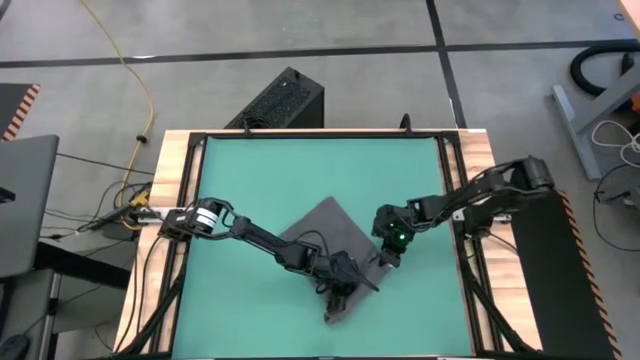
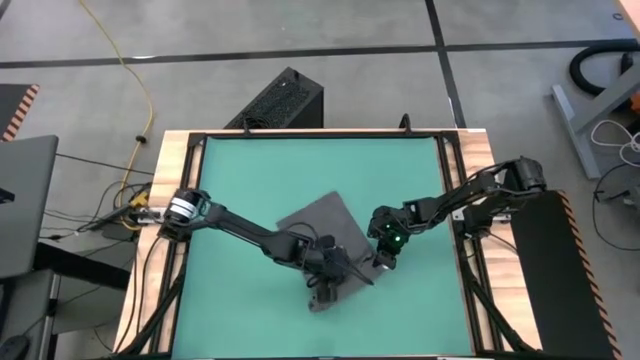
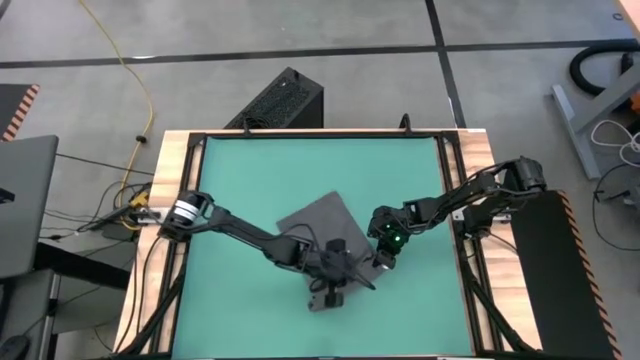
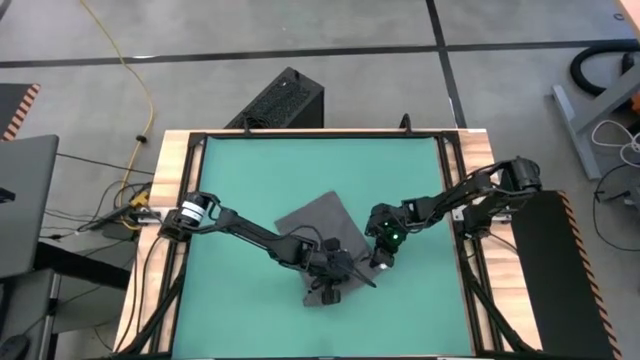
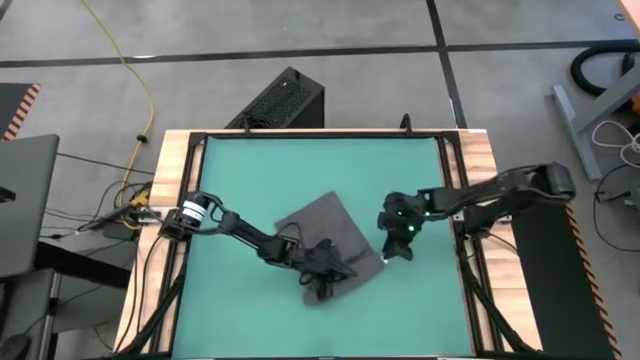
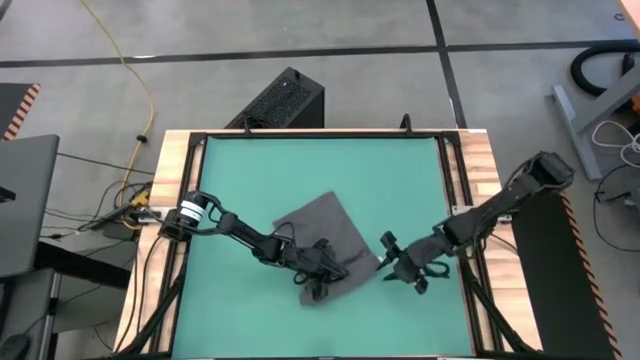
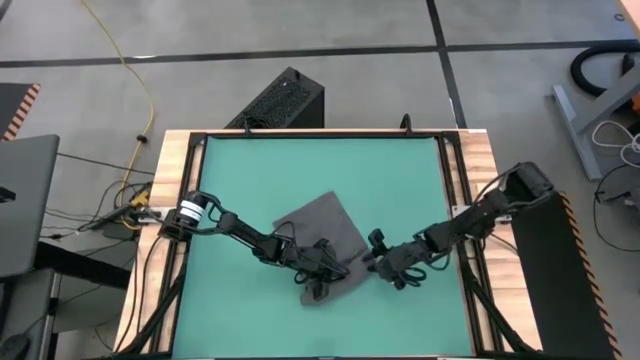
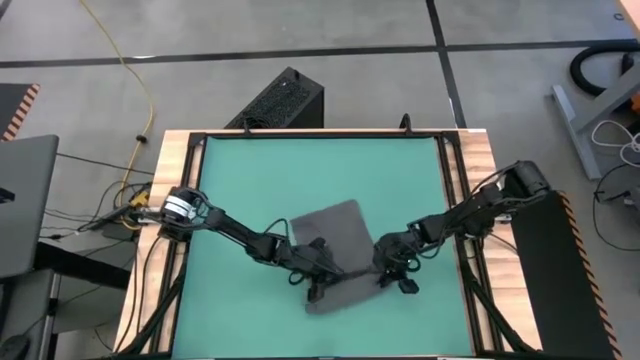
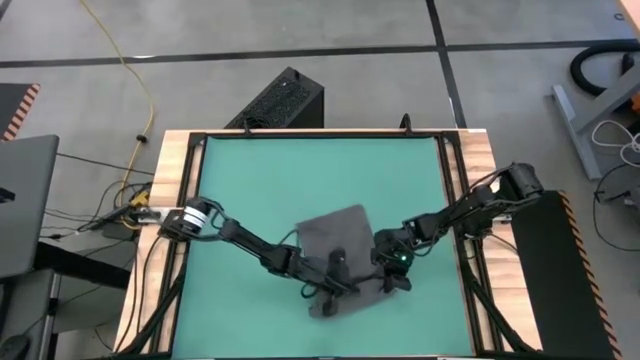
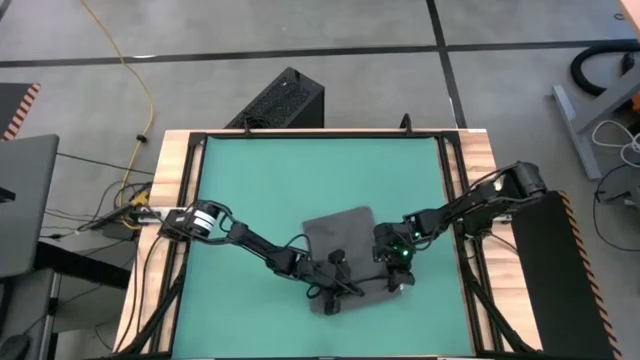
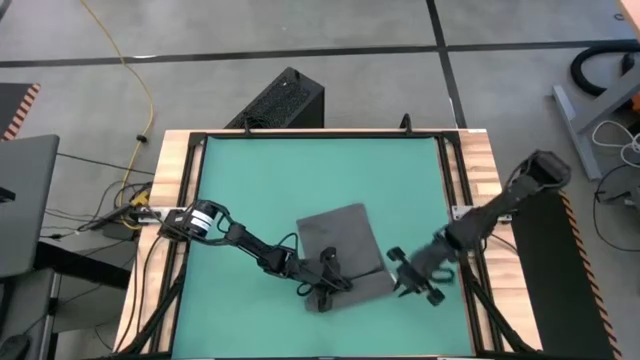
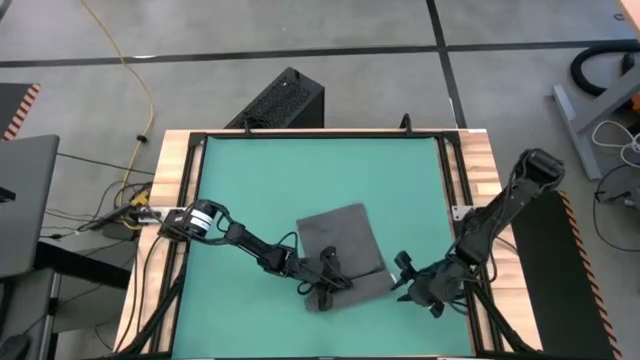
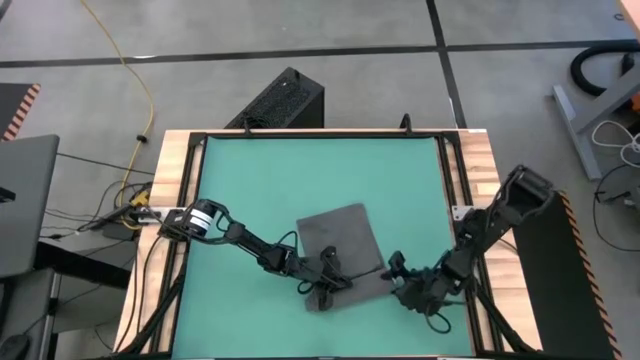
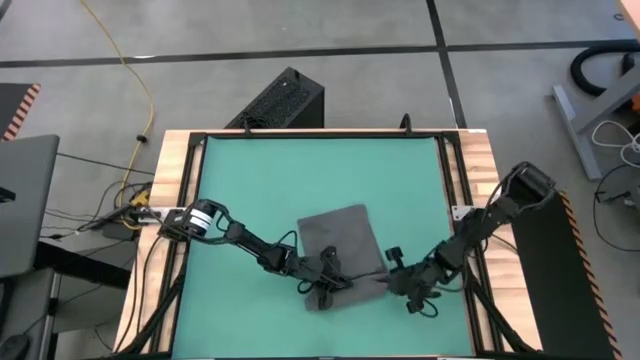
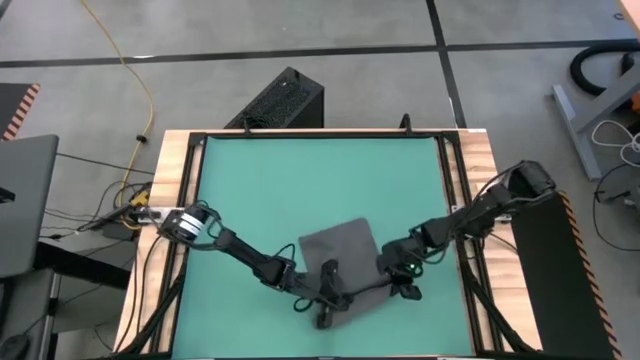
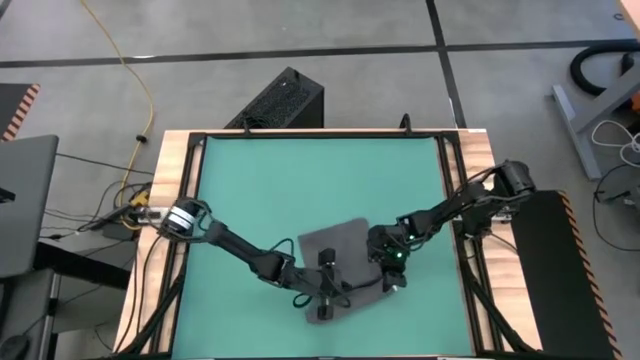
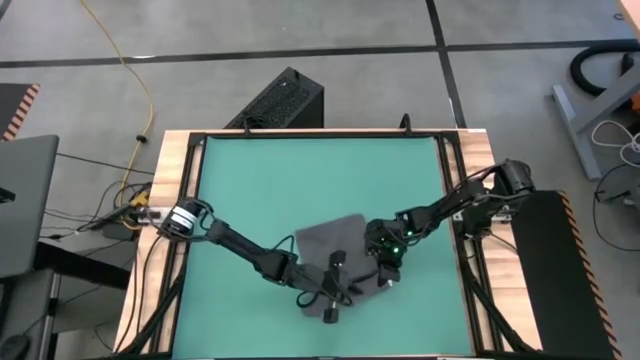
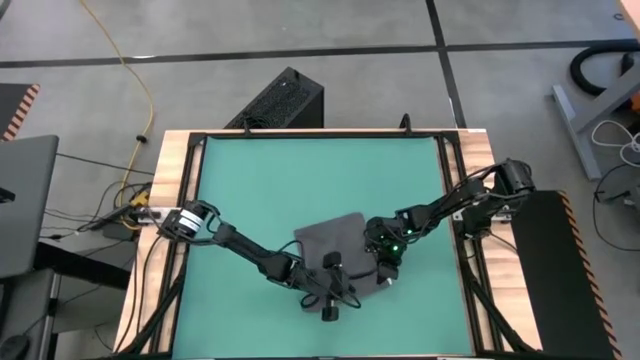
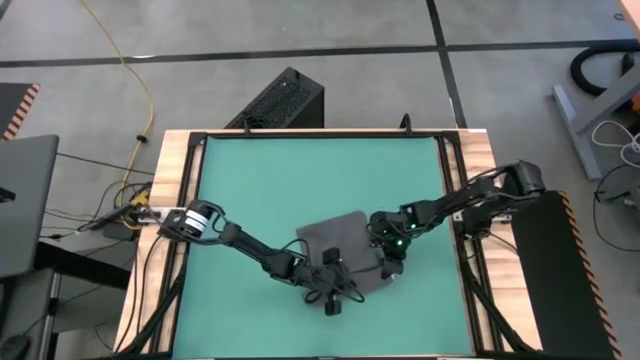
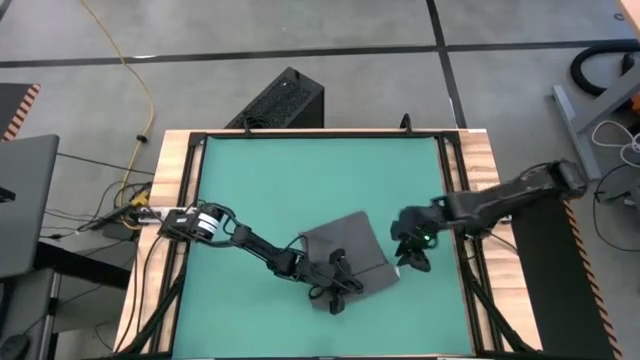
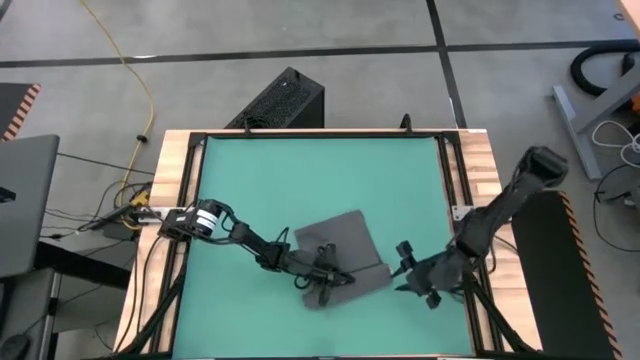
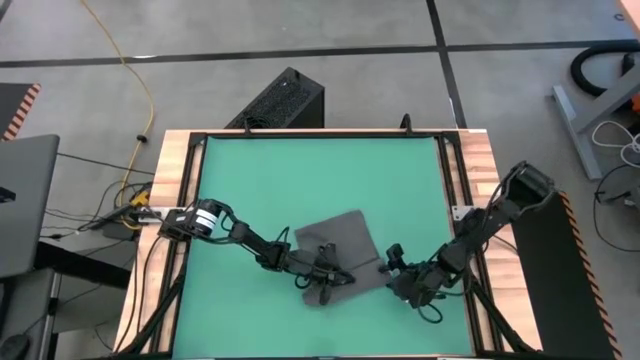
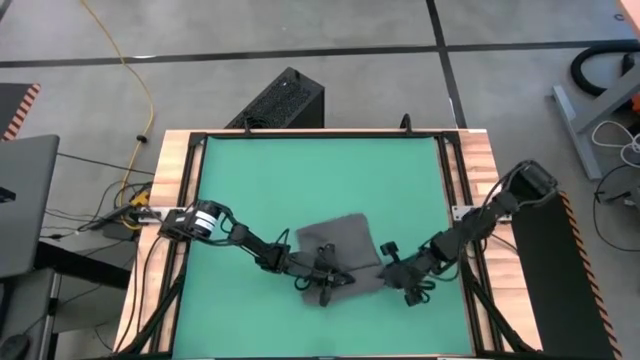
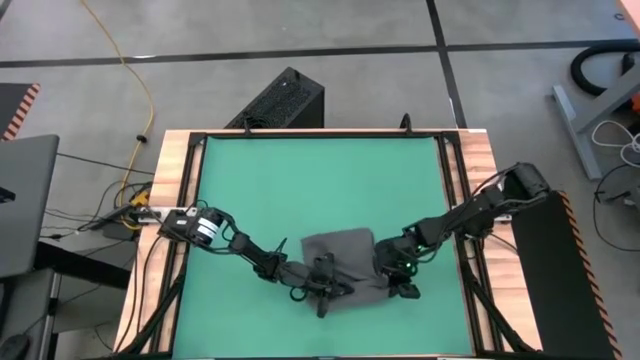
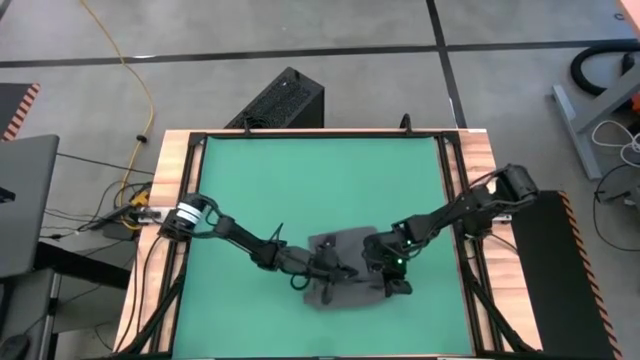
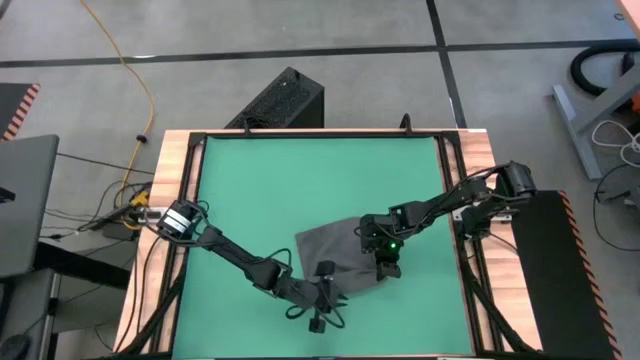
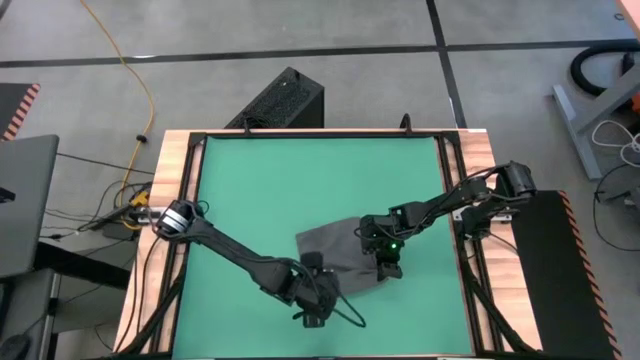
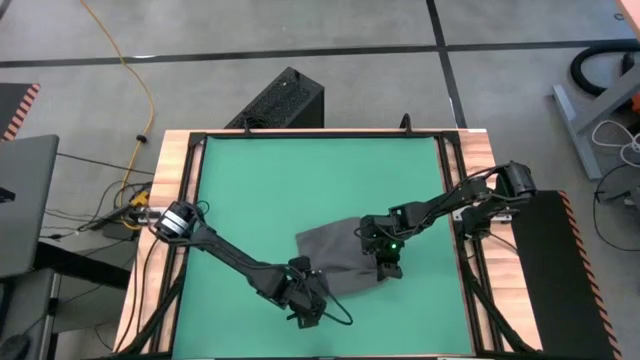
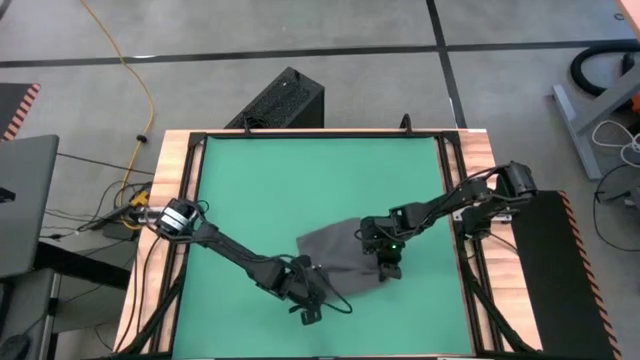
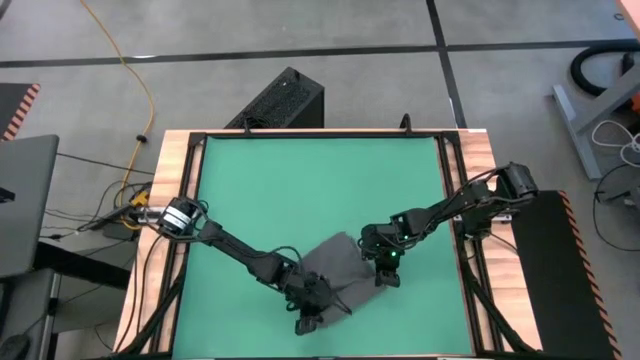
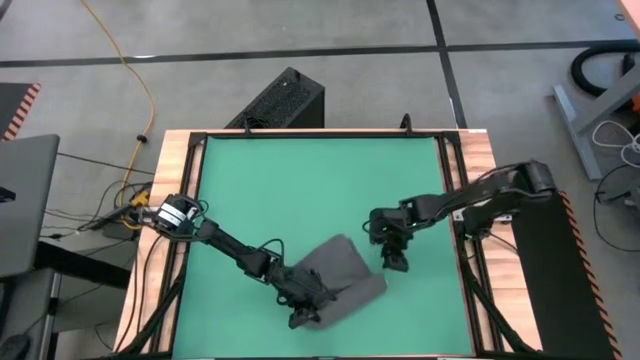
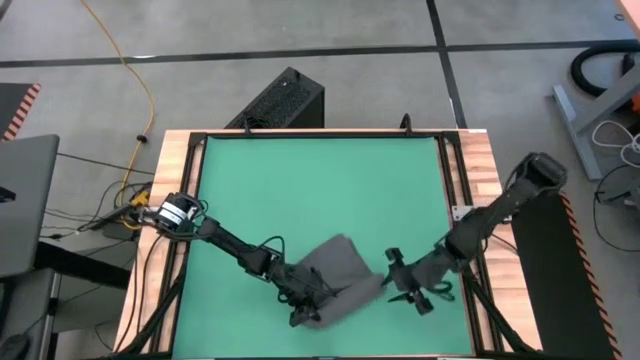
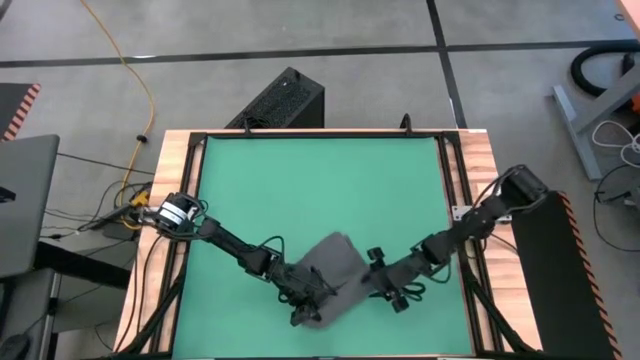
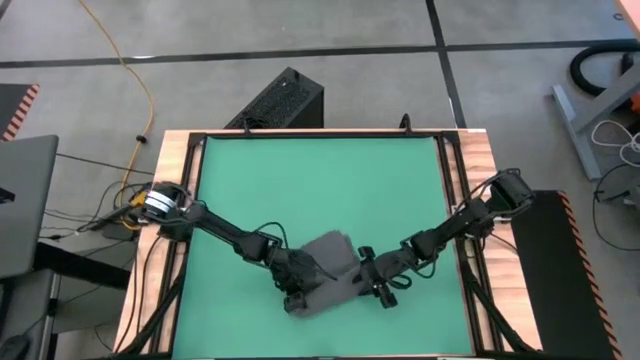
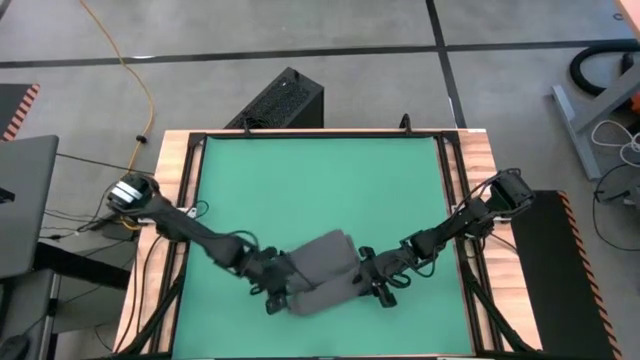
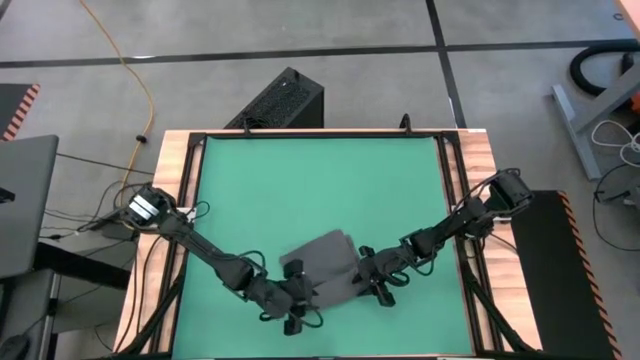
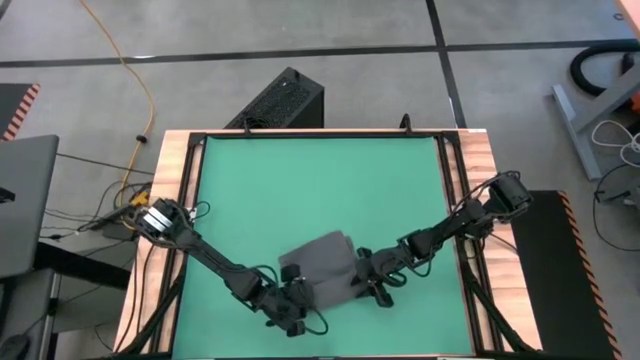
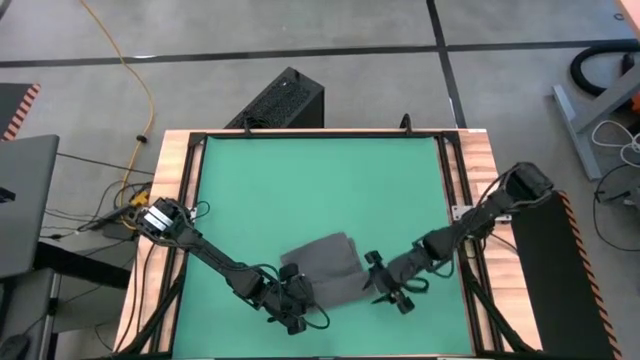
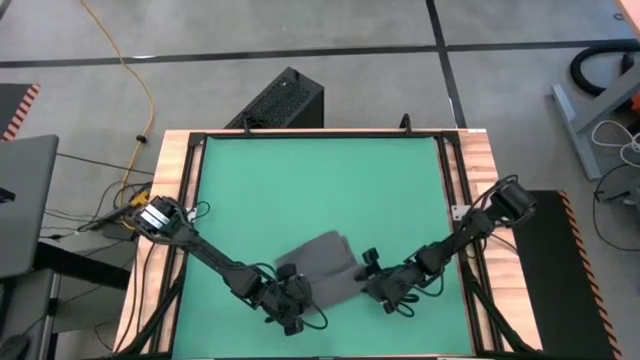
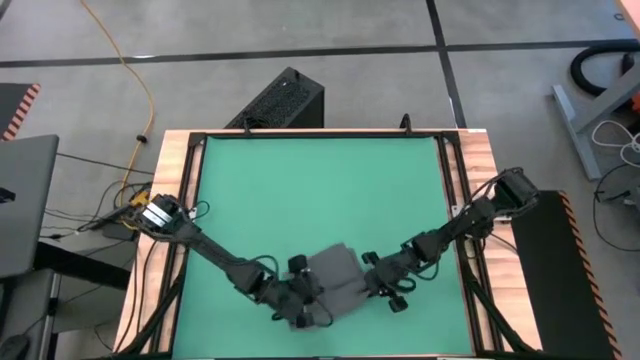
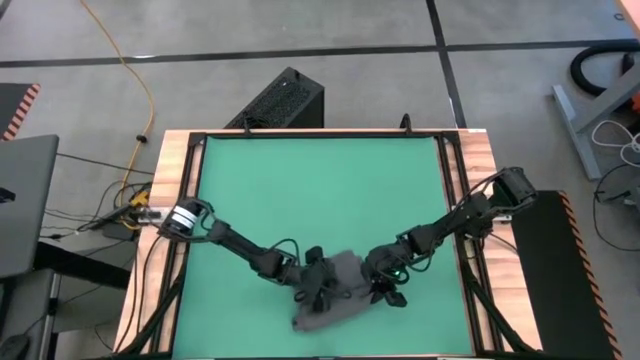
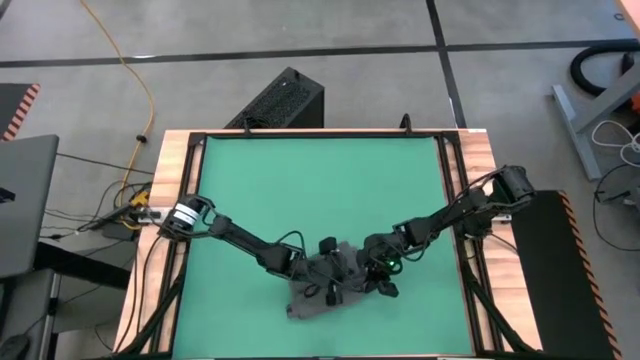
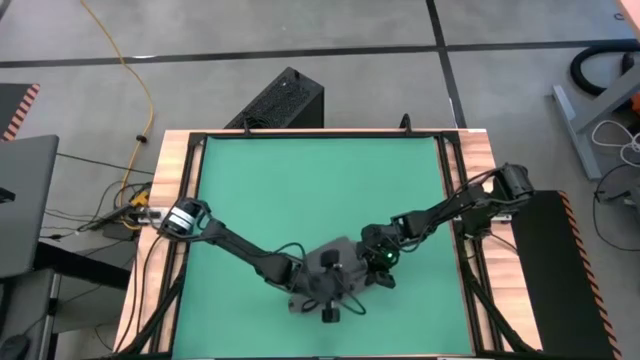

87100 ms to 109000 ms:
Task: Roll towel
Roll the black towel
